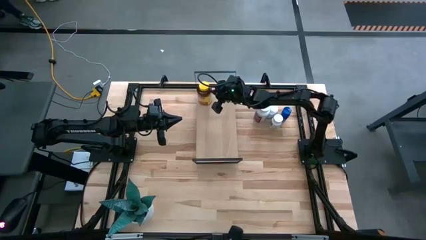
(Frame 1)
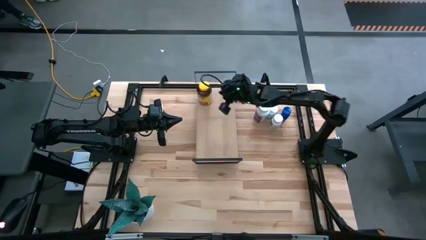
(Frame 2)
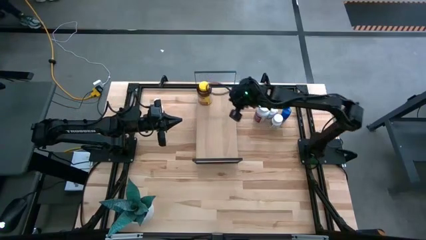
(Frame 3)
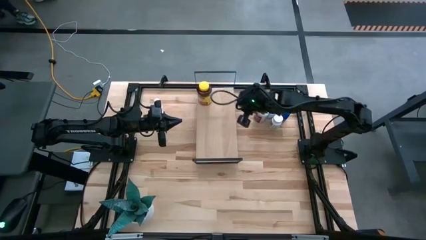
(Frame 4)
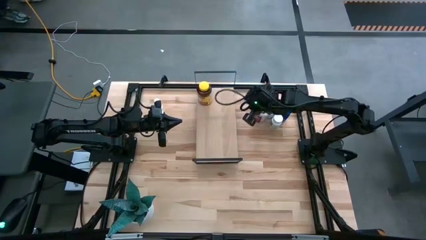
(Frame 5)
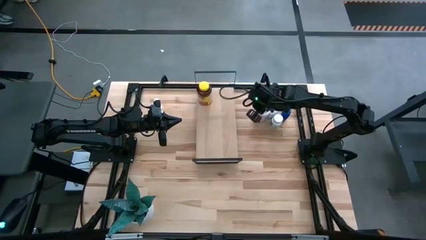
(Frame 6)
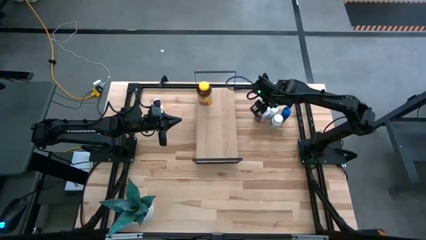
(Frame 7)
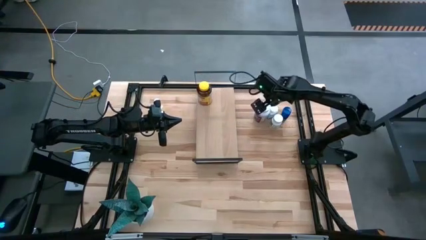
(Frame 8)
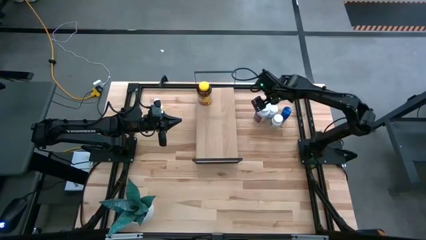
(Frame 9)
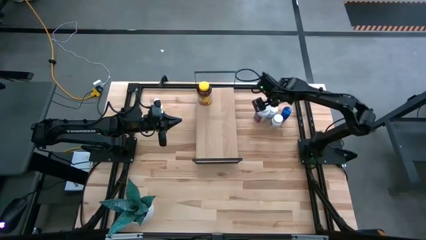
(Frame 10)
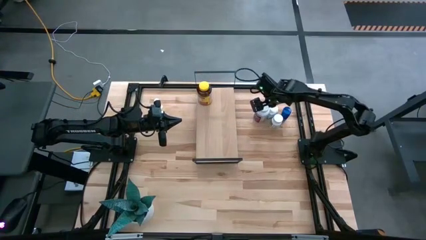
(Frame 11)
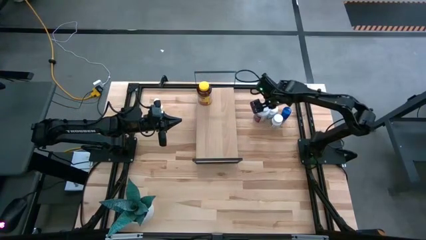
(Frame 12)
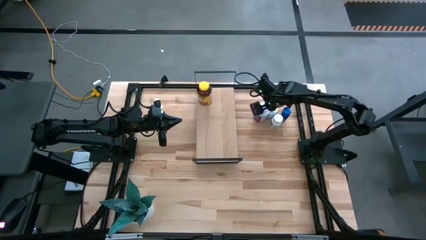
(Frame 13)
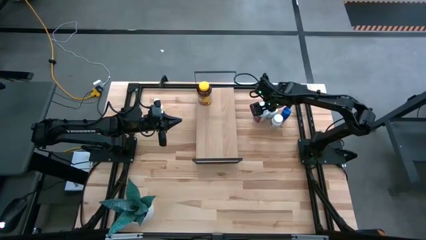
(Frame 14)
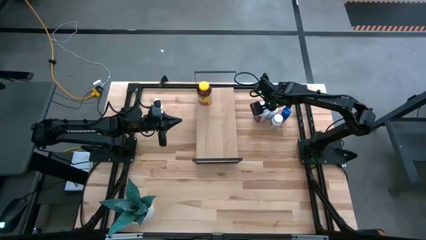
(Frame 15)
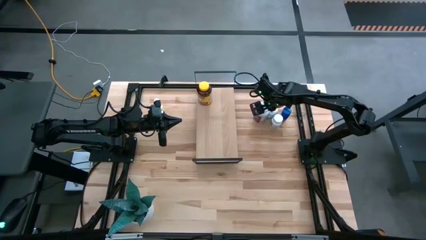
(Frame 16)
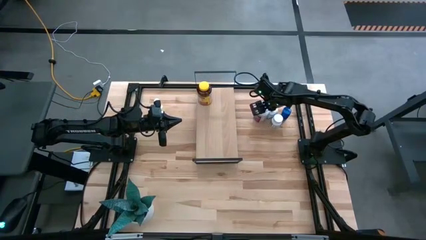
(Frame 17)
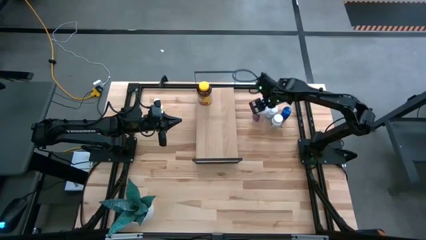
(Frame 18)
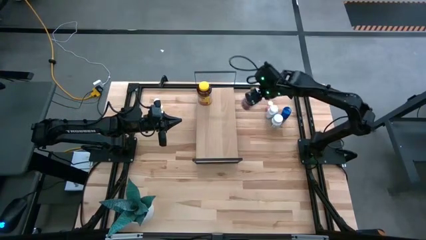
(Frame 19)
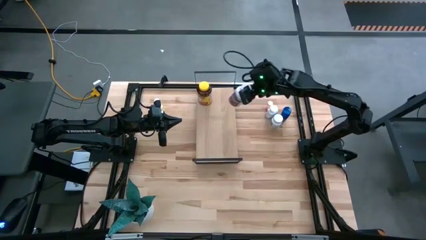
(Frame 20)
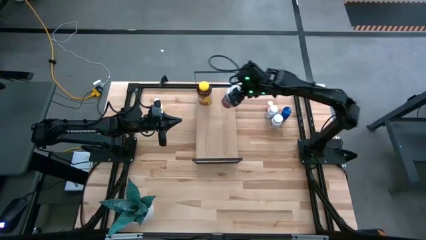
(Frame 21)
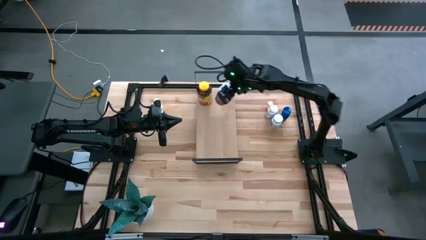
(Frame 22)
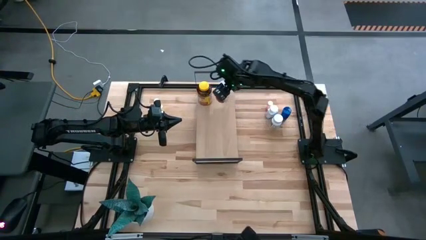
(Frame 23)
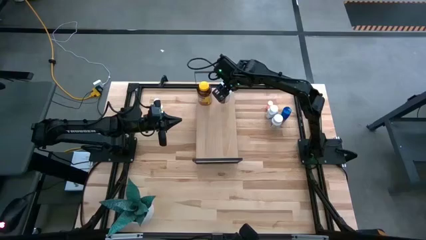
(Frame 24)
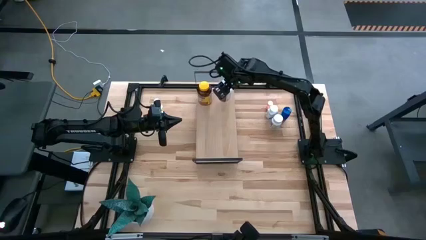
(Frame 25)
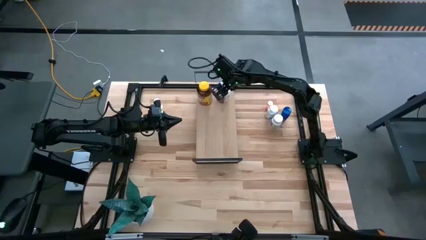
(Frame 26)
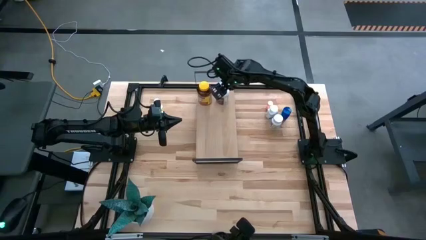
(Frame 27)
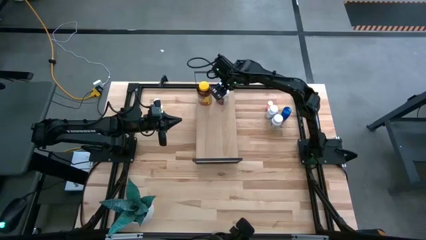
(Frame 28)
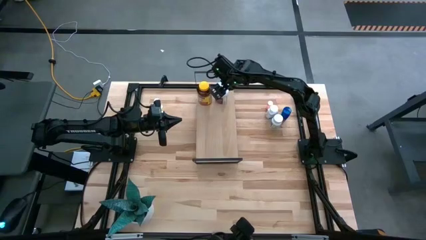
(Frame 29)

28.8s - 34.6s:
Task: Pick and place medicine bottles onto shelf by color
Put the white and purple medicine bottle on the shelf

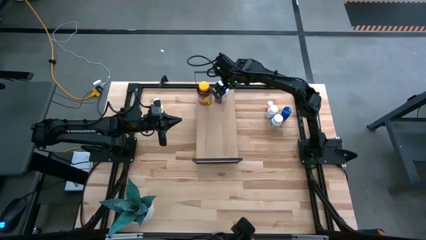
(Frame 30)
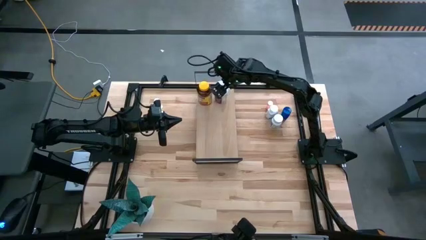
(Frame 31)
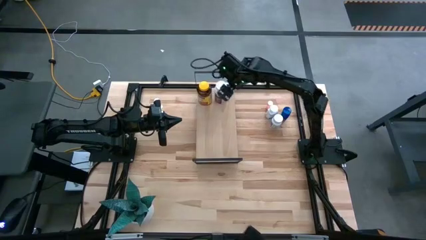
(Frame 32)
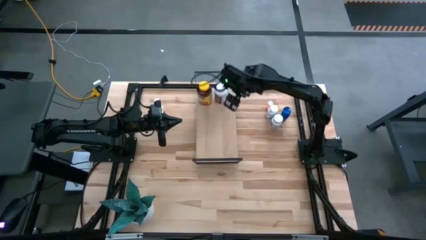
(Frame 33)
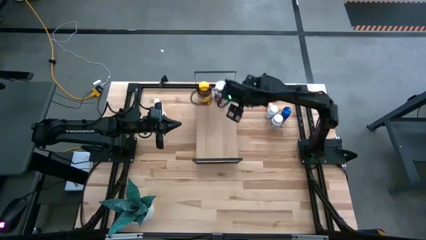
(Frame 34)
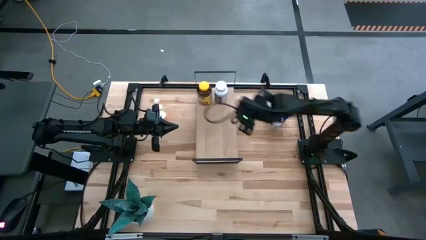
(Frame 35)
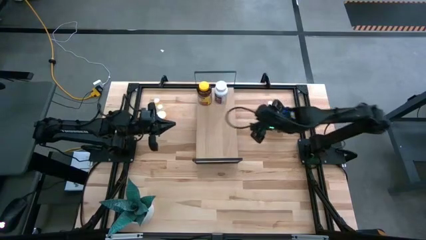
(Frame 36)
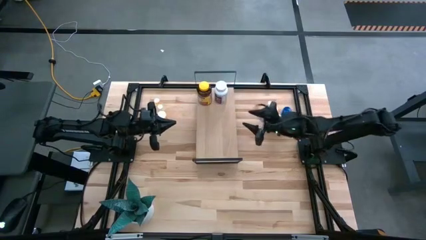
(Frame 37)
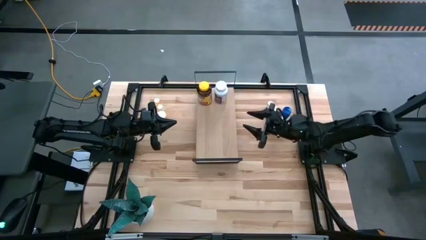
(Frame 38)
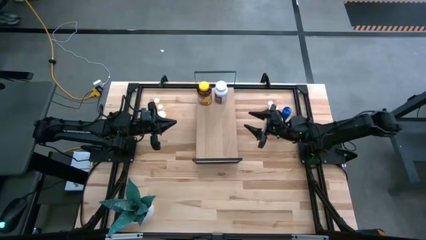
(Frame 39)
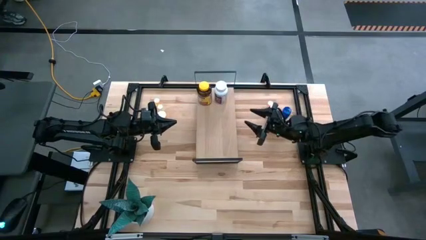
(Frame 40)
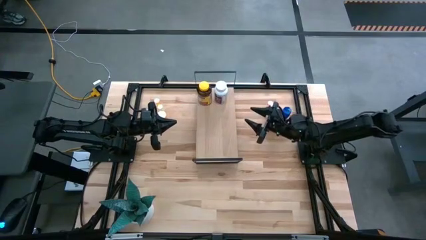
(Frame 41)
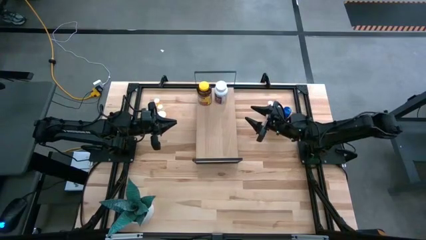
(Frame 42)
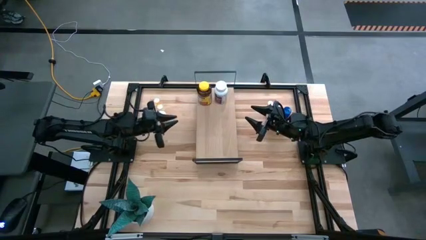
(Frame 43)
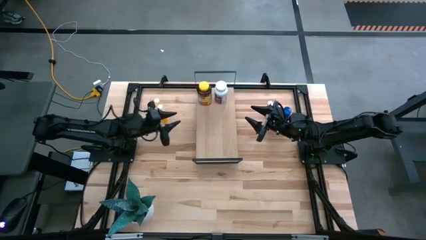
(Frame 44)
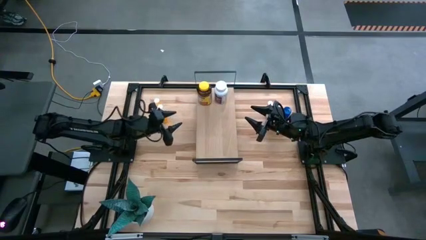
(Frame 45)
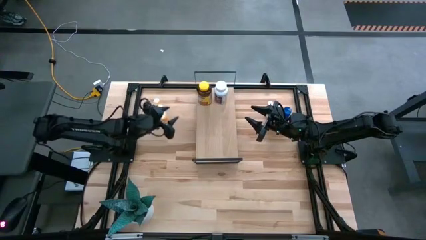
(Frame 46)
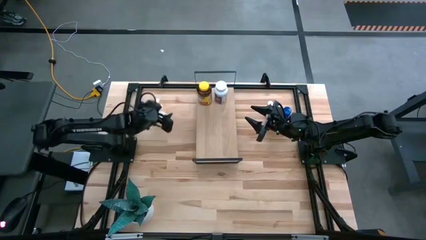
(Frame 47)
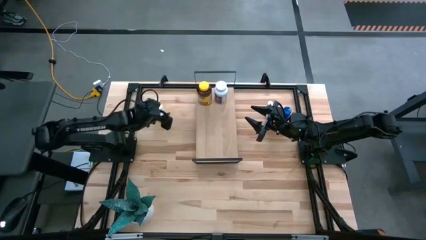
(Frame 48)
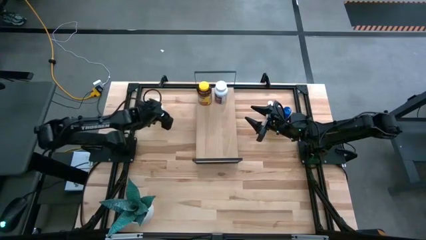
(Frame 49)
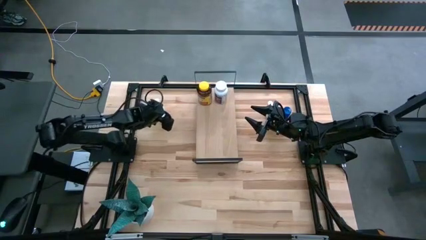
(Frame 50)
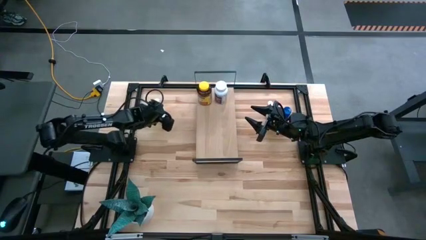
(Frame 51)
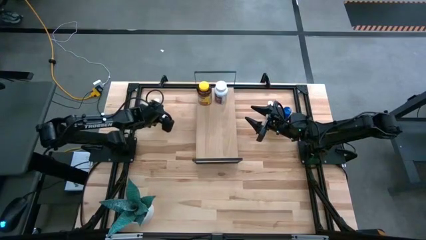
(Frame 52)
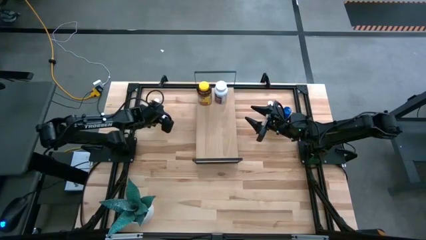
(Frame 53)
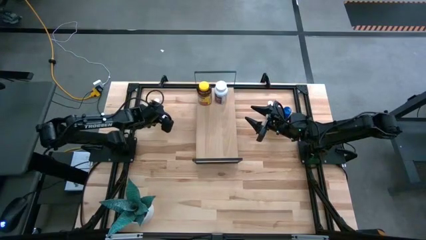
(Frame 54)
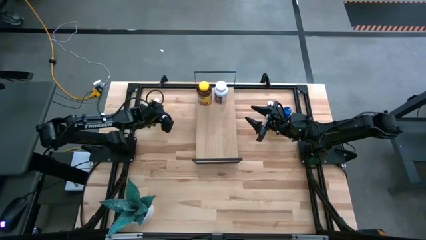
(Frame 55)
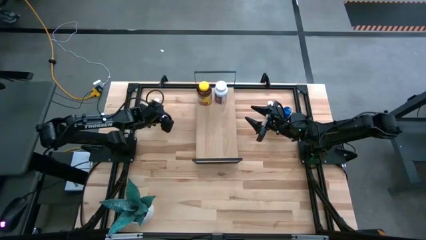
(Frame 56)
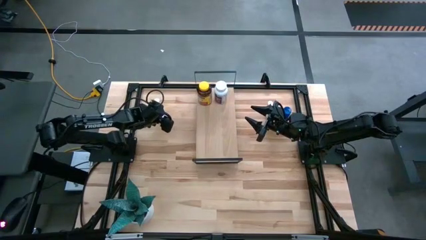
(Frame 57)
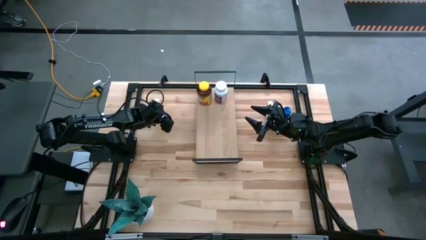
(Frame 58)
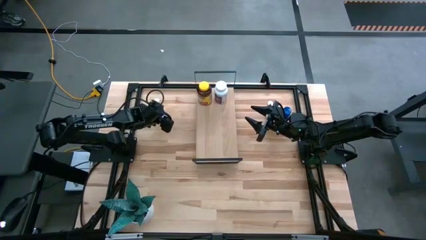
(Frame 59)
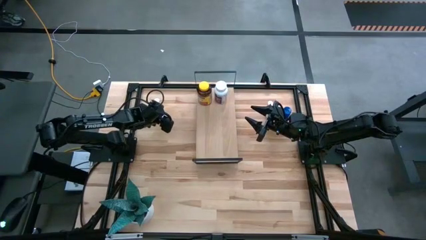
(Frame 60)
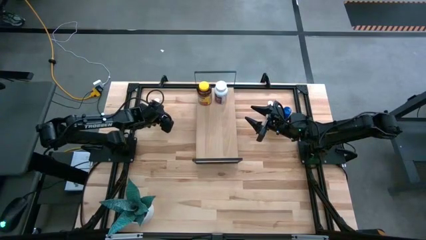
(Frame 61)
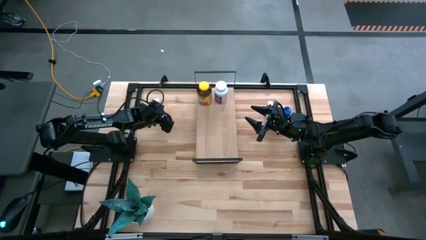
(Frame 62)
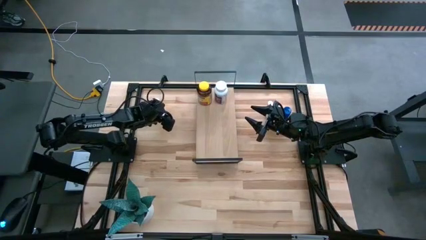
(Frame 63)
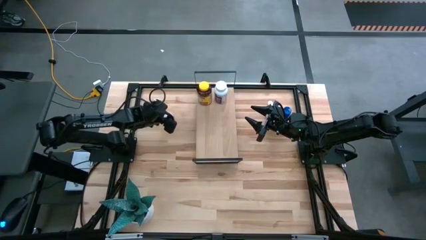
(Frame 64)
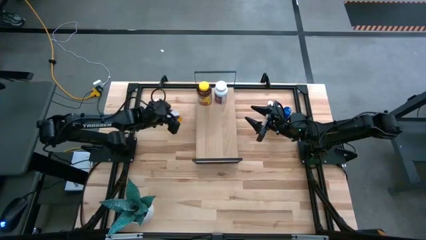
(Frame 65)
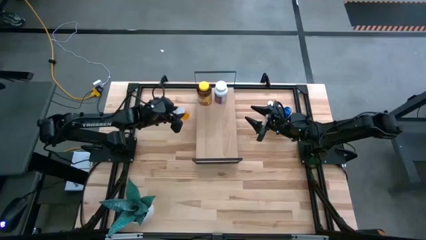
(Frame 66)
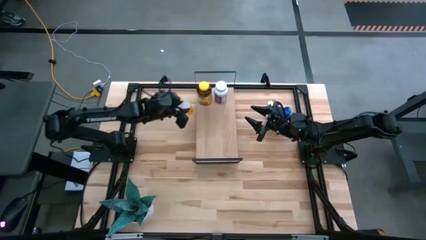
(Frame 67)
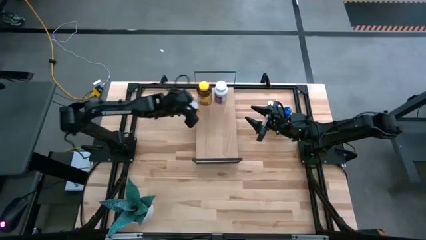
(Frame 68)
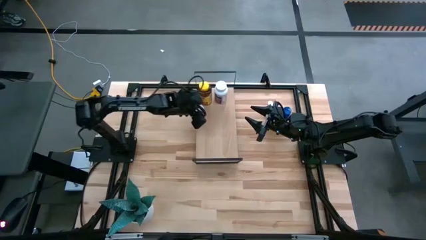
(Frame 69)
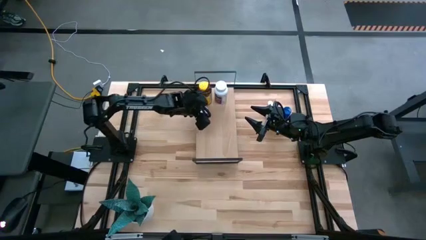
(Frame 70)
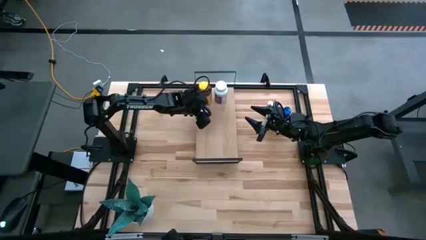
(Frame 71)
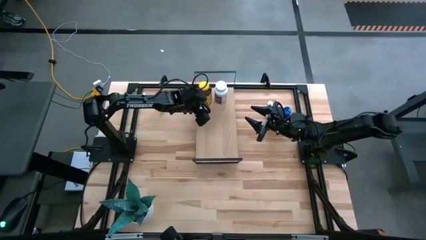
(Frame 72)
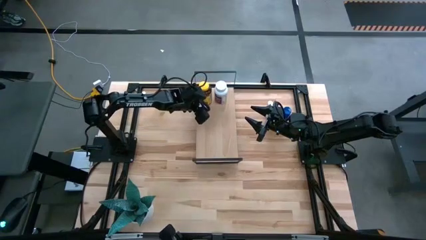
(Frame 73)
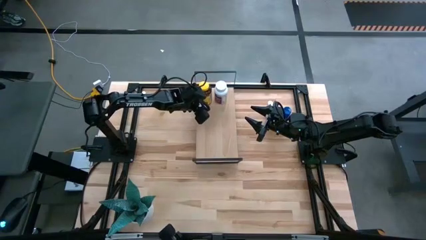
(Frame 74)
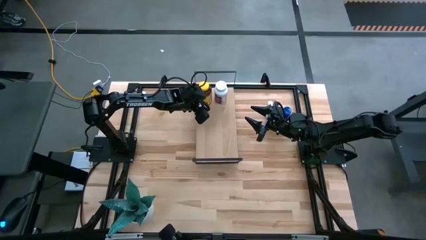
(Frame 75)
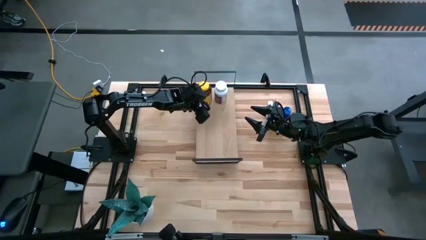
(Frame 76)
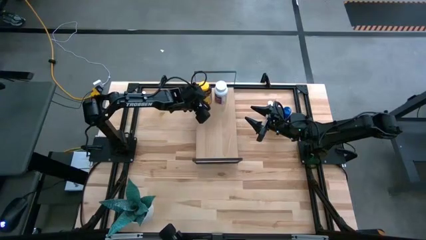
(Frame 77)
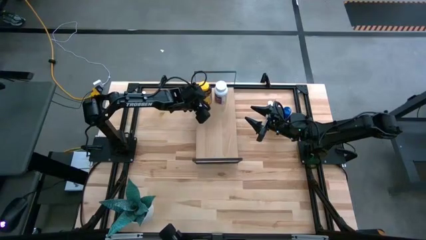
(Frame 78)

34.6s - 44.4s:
Put the big orange medicine bottle on the shelf

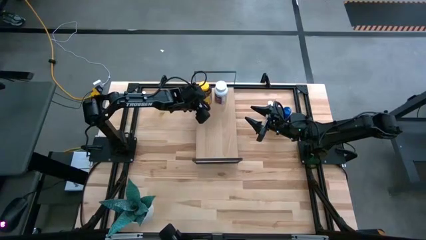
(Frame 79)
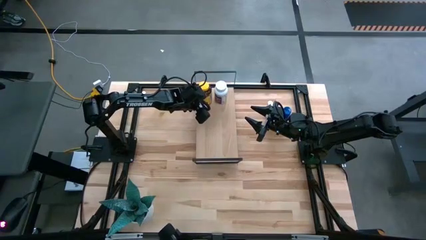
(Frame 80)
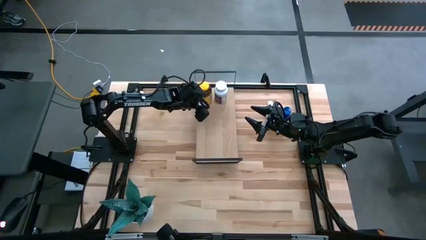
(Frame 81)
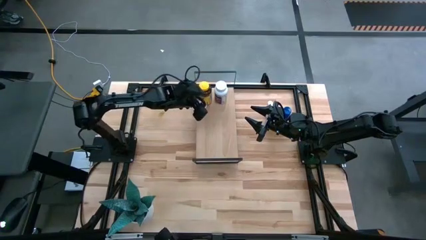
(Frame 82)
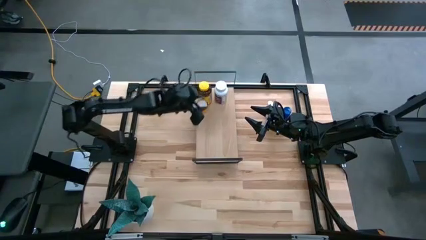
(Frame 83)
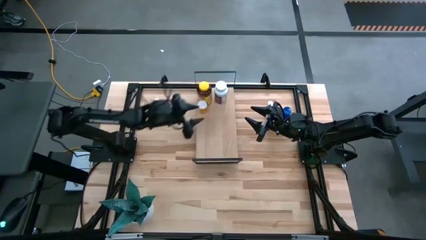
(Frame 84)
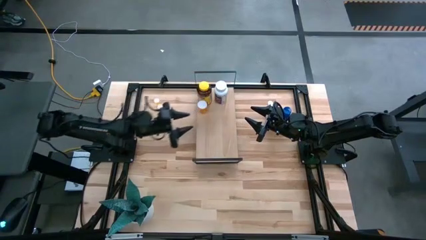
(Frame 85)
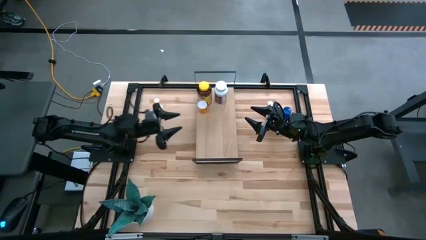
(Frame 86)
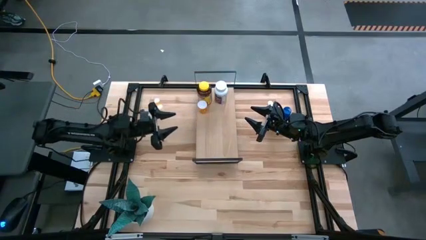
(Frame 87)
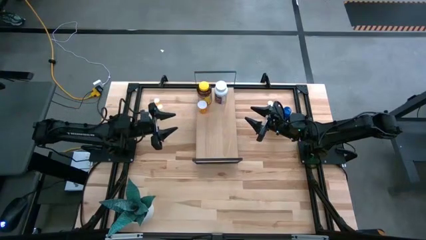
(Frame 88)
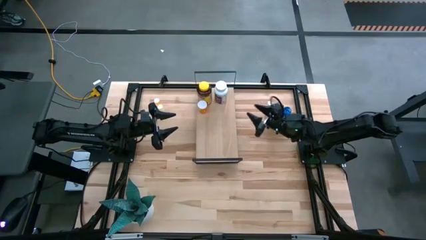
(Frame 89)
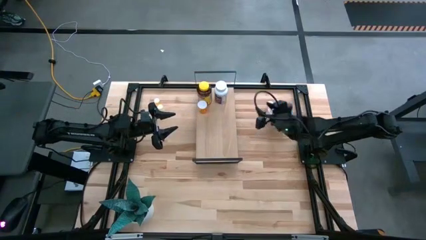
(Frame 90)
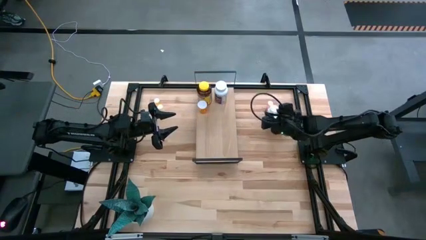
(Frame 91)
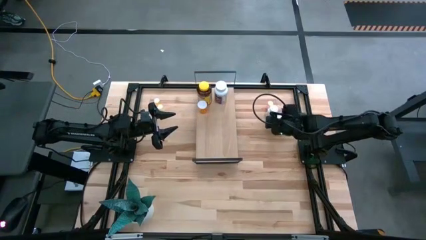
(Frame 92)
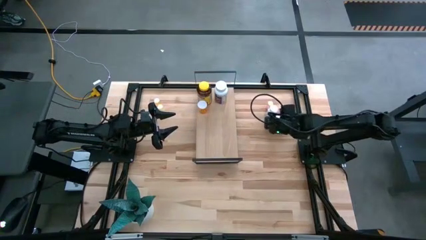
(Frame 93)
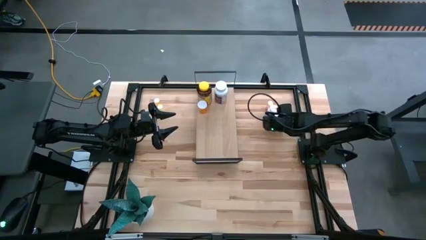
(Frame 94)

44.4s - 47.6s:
Put the white medicine bottle on the shelf
